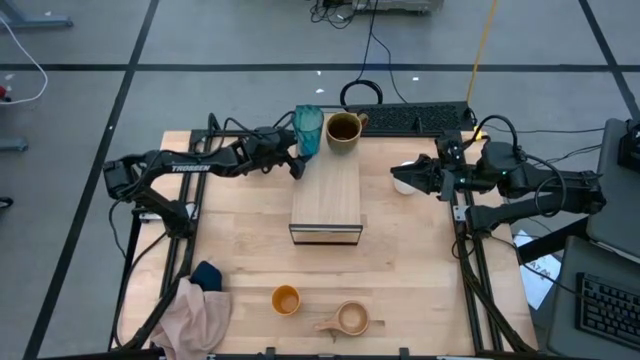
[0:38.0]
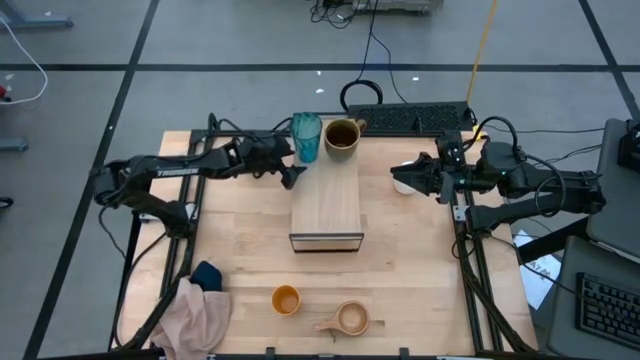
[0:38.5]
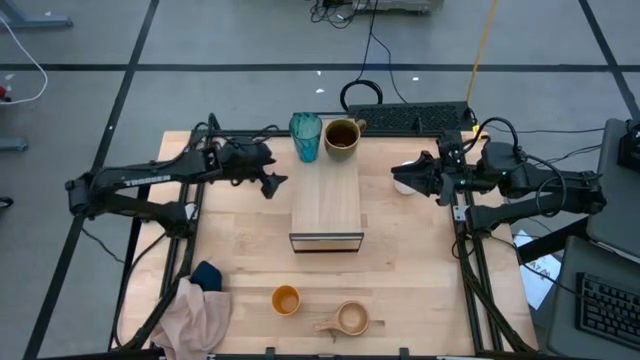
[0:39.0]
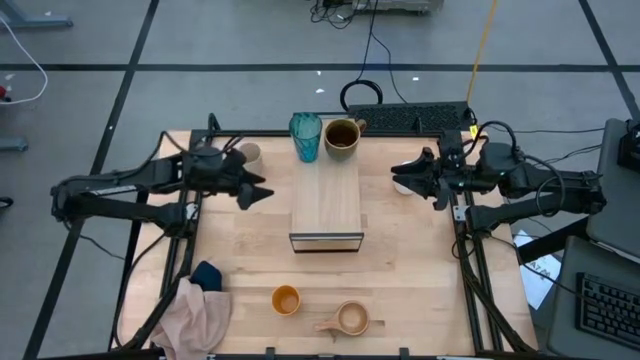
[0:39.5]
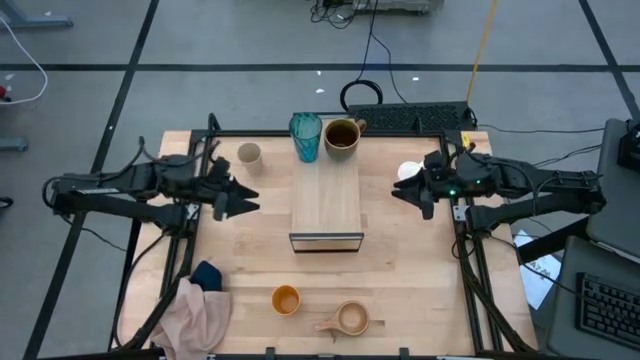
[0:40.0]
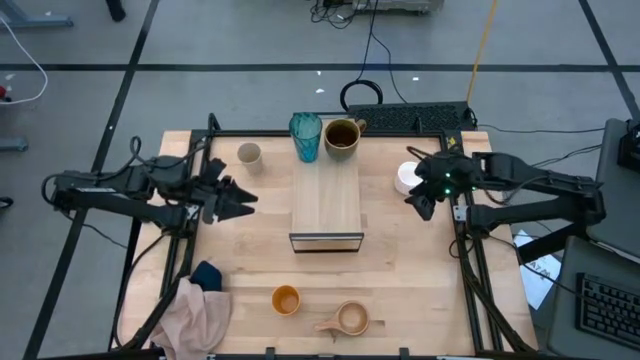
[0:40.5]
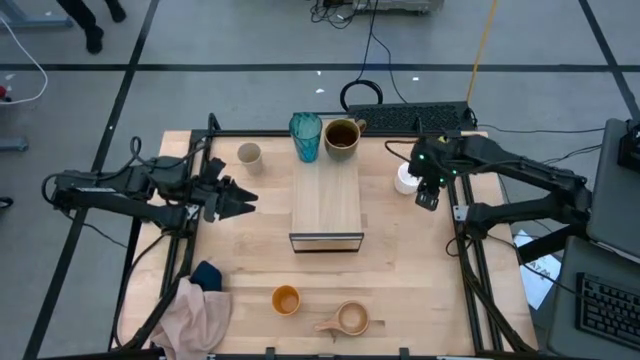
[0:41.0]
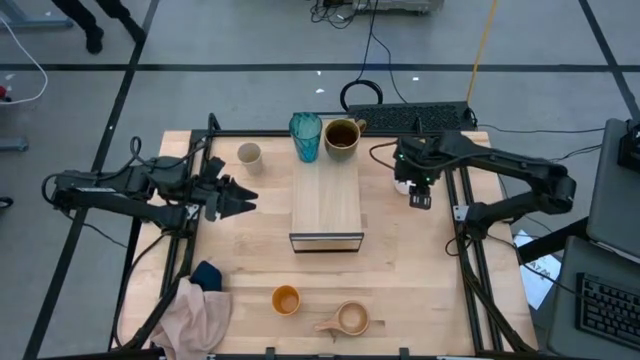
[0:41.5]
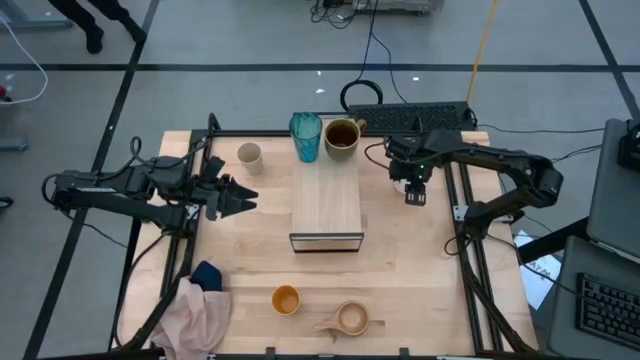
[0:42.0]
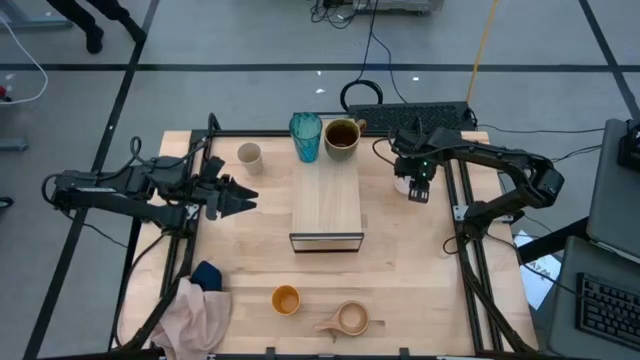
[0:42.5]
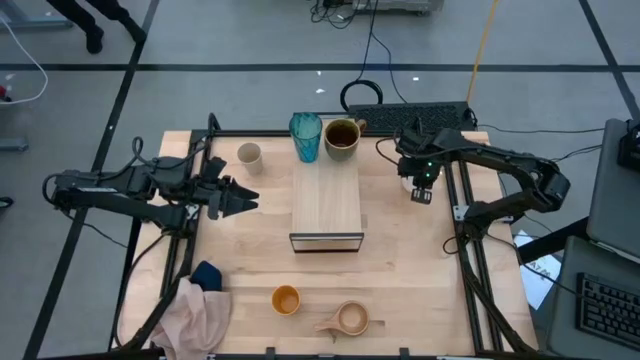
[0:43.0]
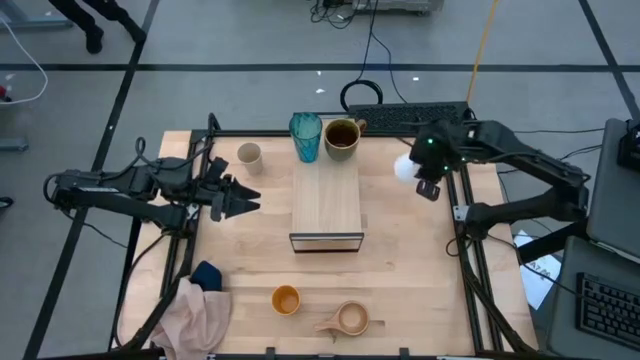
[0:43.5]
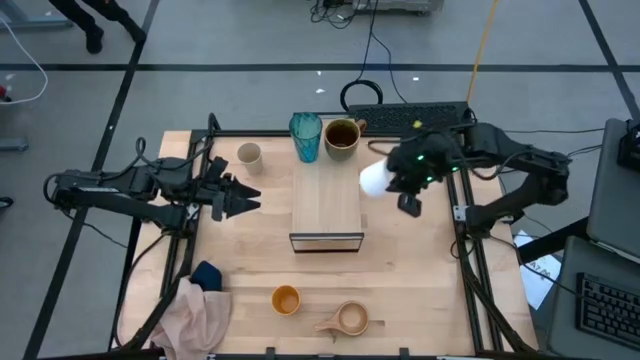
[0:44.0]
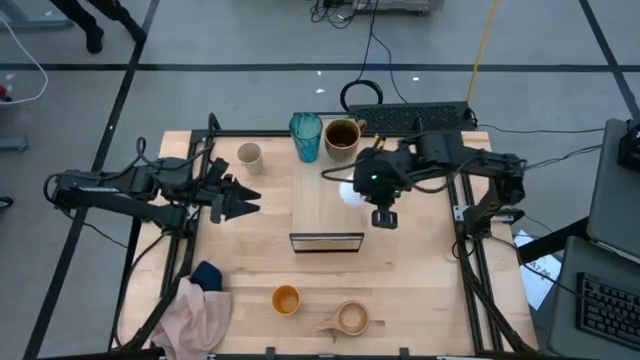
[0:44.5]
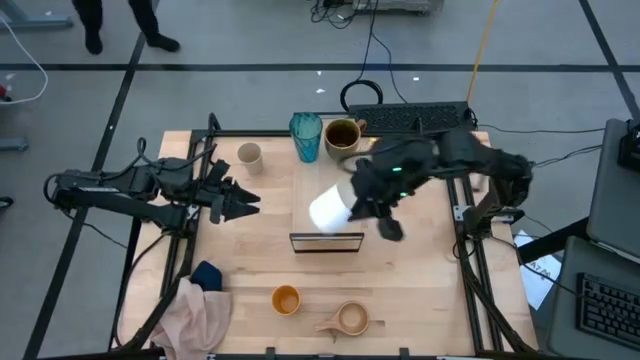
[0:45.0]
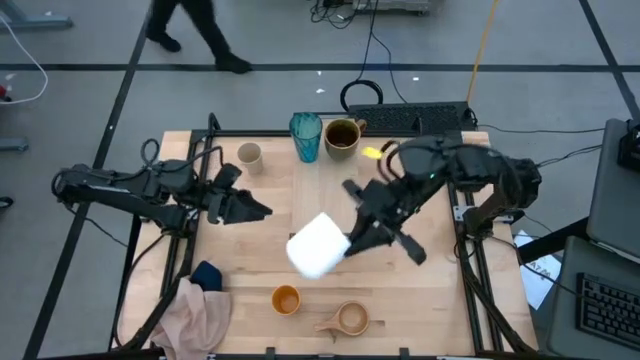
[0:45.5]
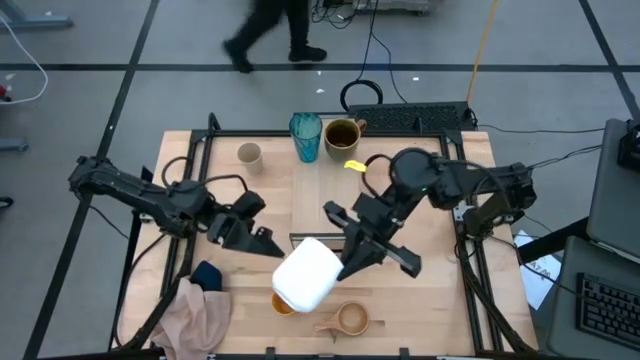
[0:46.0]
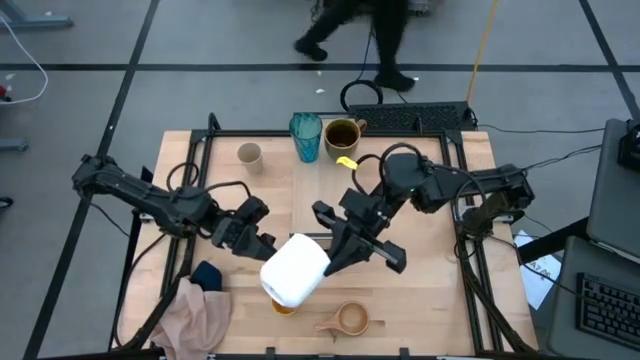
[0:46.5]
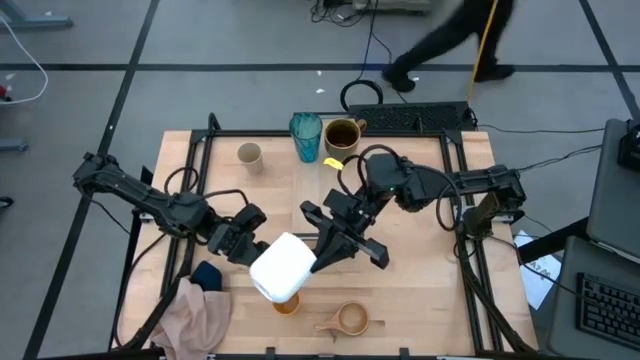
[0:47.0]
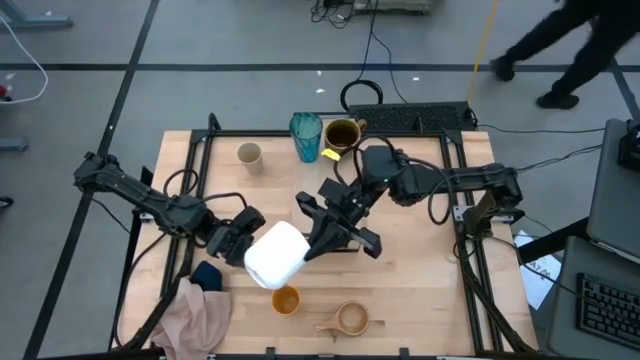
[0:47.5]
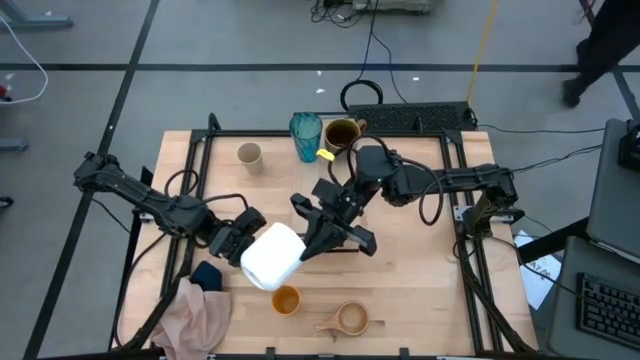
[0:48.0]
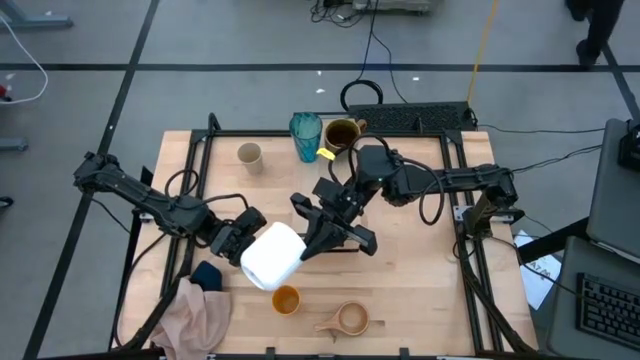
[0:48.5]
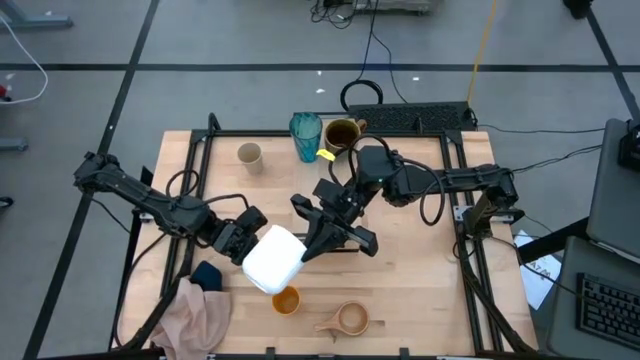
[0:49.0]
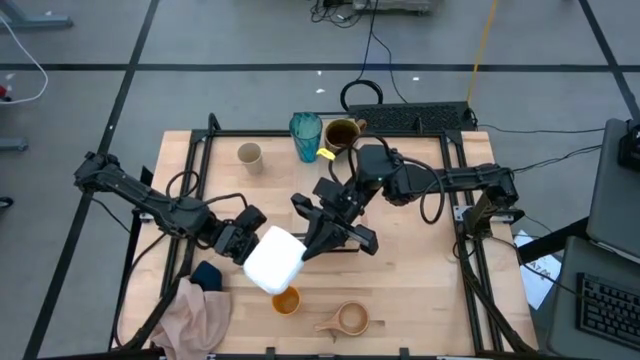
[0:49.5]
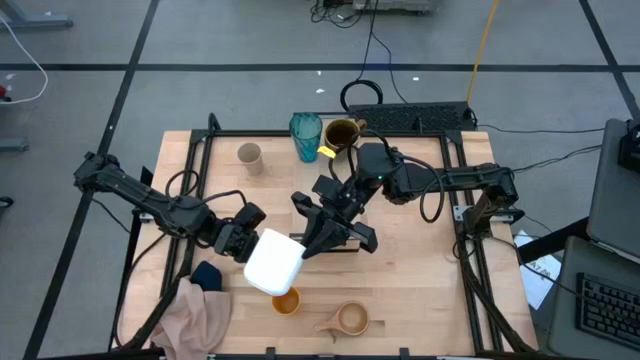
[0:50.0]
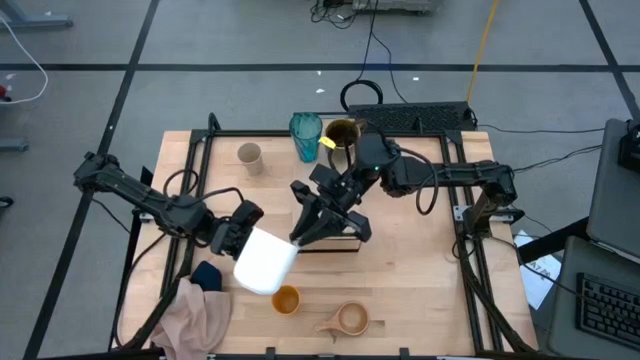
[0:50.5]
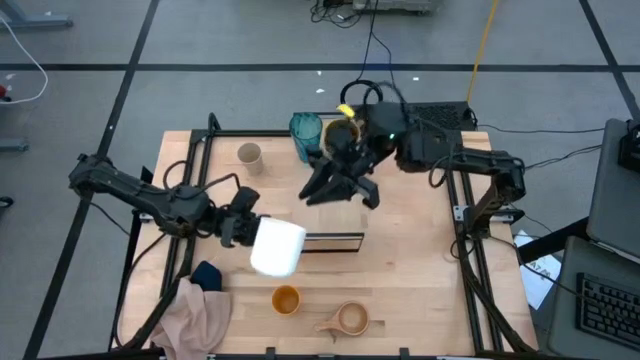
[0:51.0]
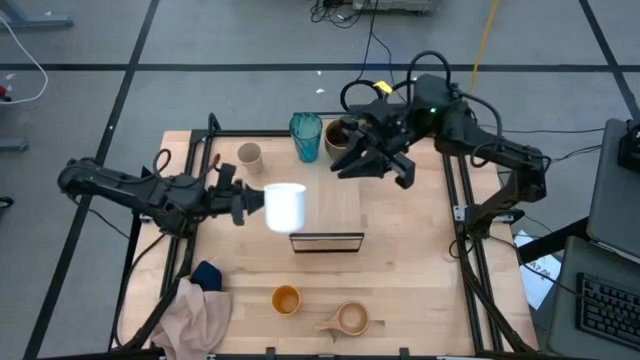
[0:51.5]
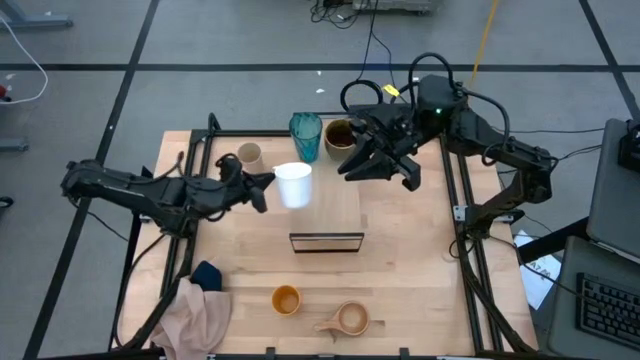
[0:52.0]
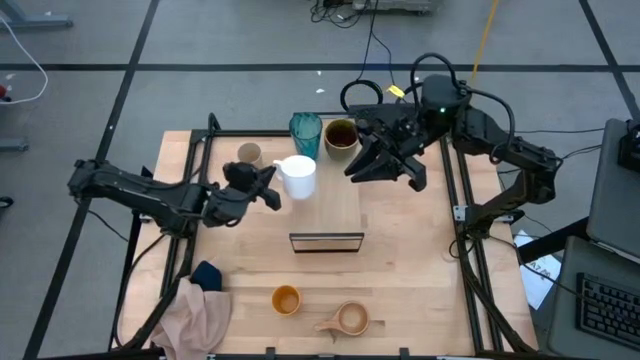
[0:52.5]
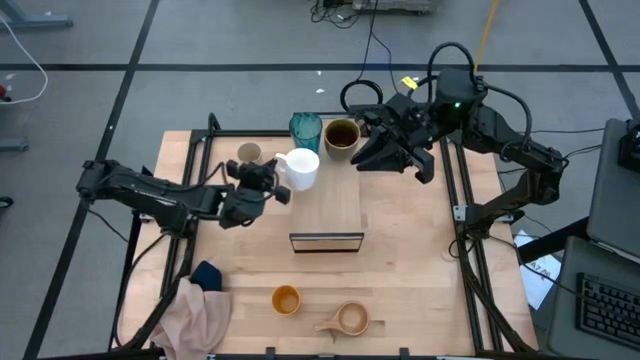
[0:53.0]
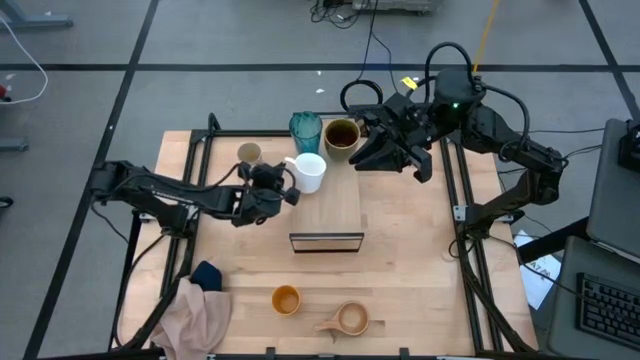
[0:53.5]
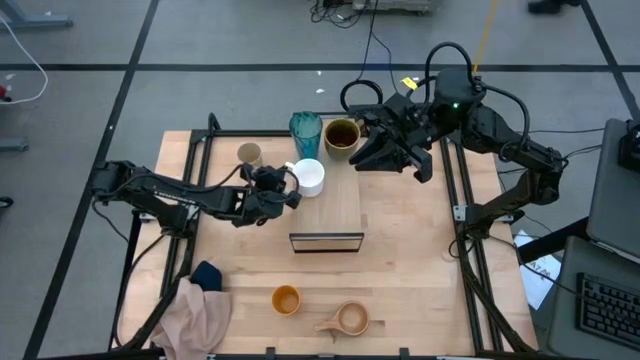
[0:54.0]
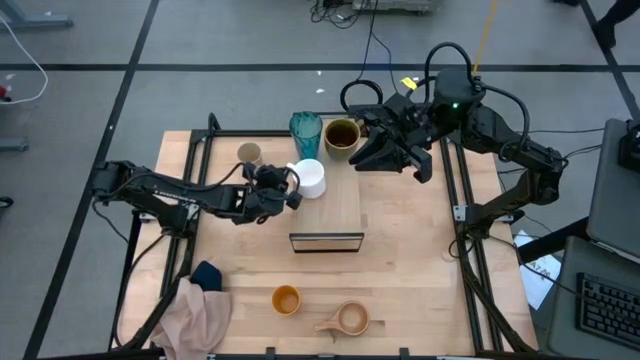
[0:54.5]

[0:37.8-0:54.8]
Task: Stack small to large cups/mugs on shelf
Put the white mug on the shelf

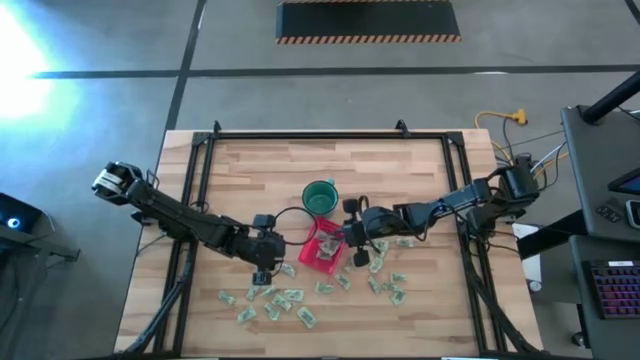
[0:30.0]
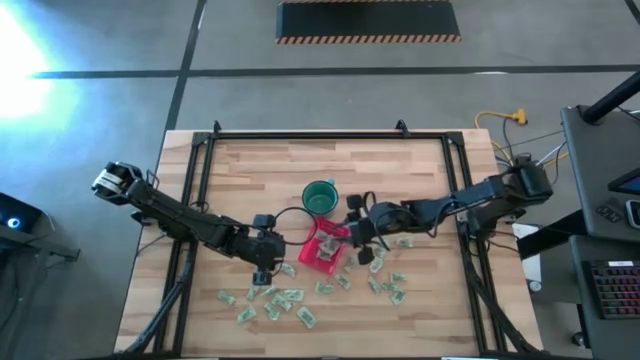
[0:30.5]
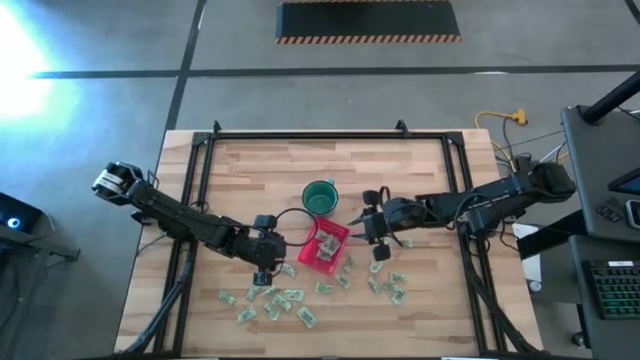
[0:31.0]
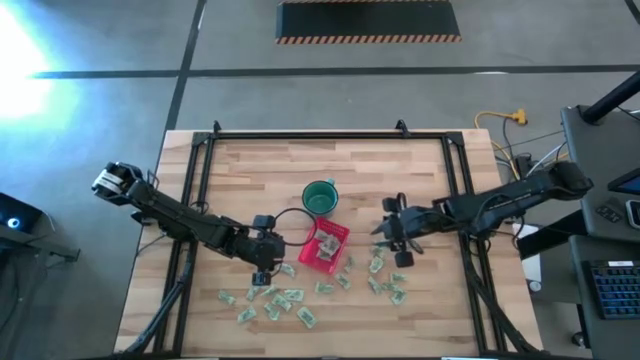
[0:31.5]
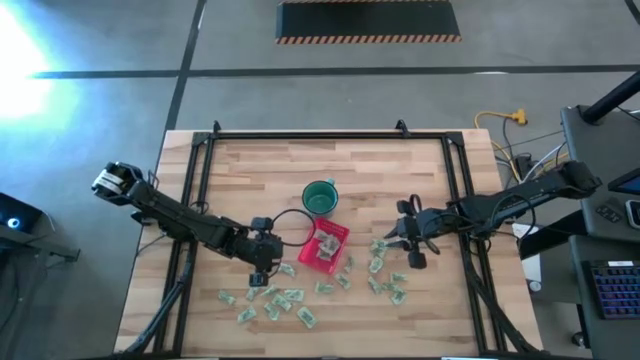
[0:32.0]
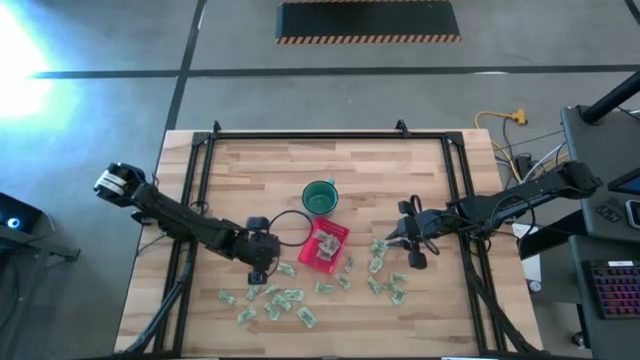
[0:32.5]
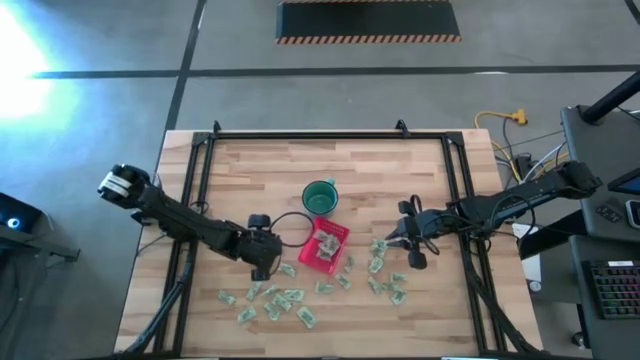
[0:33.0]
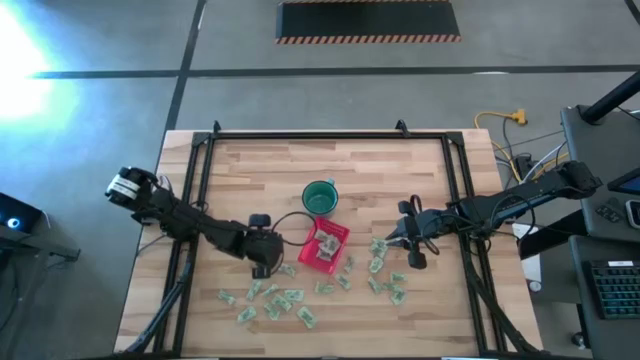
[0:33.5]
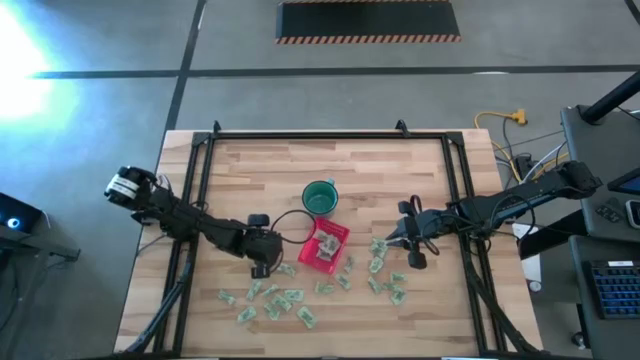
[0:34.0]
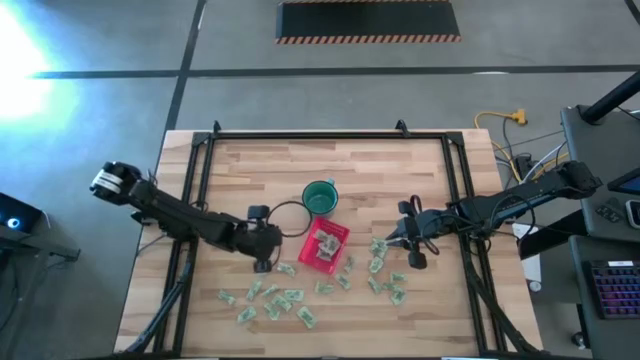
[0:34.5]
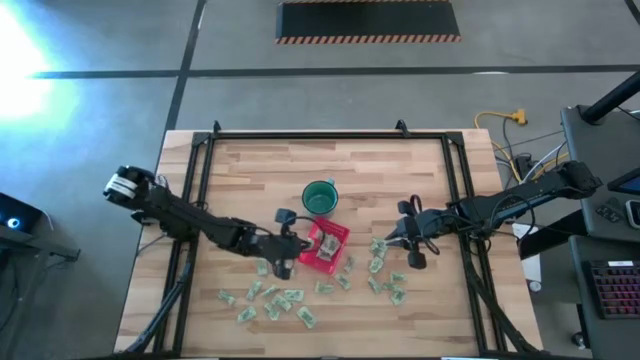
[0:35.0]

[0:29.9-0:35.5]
Task: Pick and place items into bin
Put the light green stevia packet into the red bin
